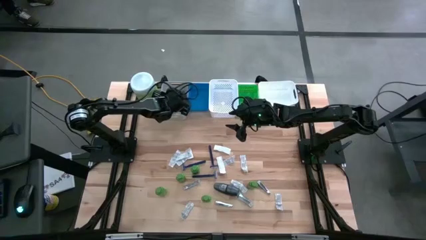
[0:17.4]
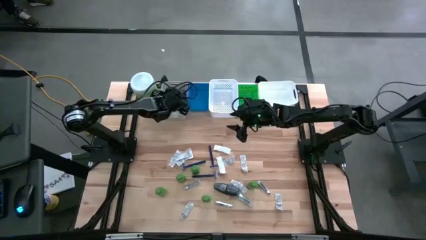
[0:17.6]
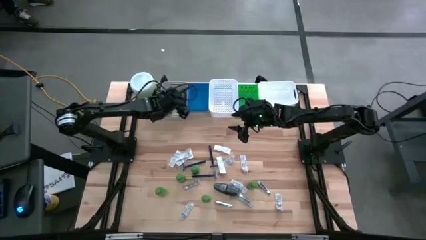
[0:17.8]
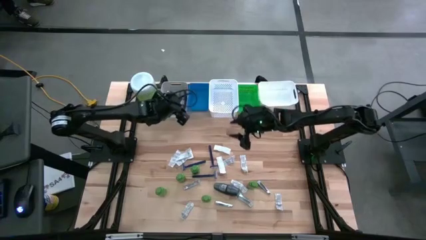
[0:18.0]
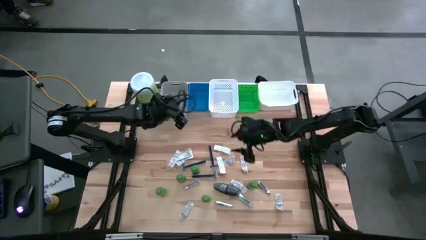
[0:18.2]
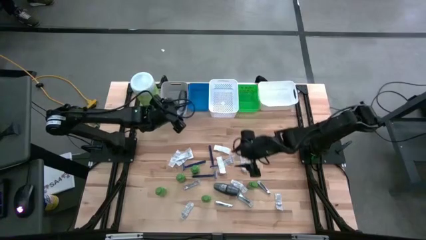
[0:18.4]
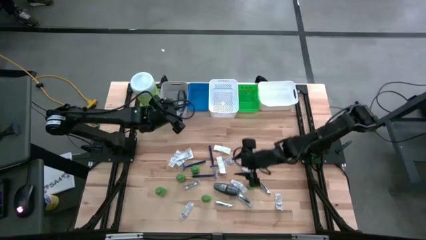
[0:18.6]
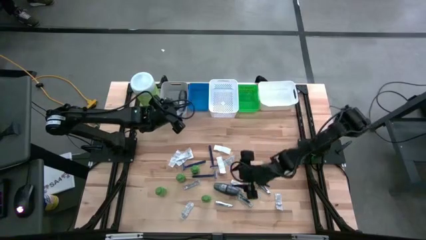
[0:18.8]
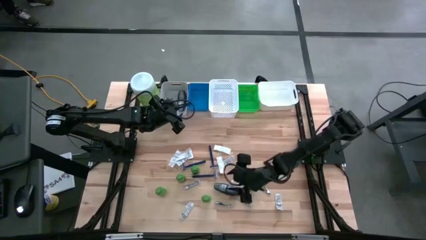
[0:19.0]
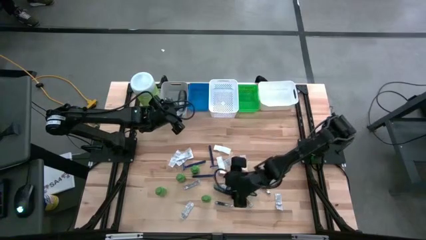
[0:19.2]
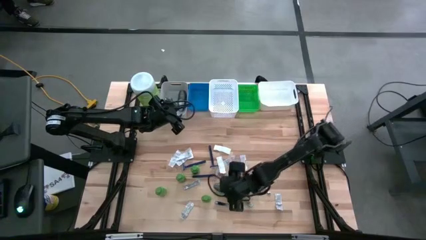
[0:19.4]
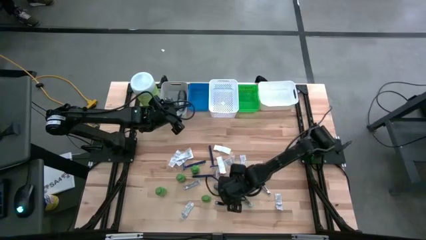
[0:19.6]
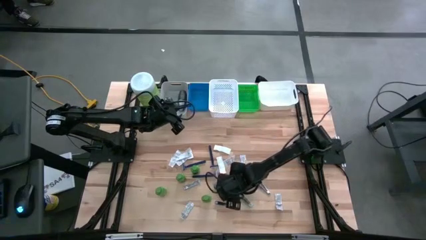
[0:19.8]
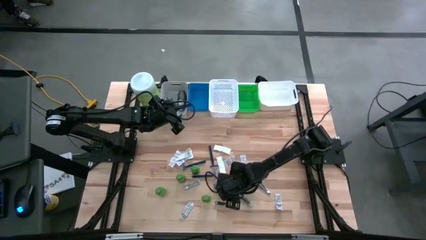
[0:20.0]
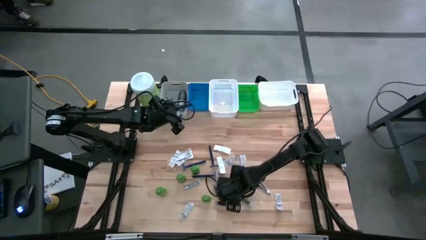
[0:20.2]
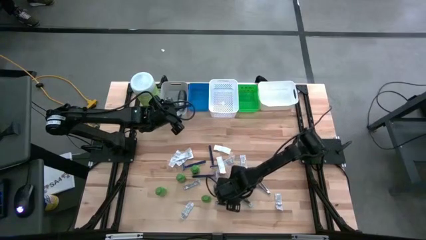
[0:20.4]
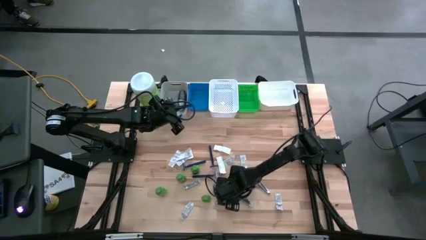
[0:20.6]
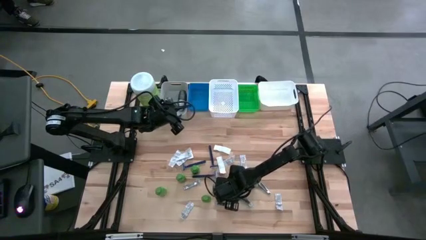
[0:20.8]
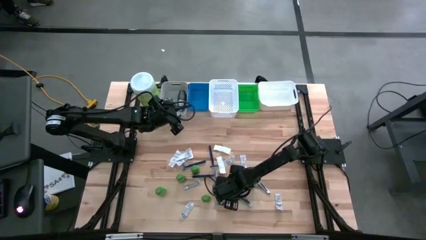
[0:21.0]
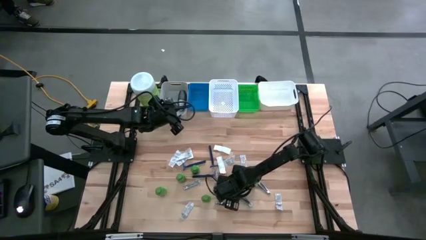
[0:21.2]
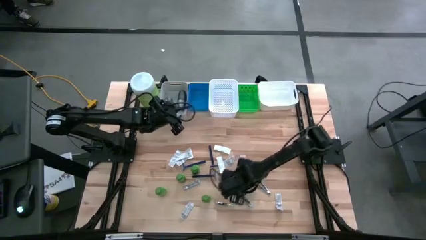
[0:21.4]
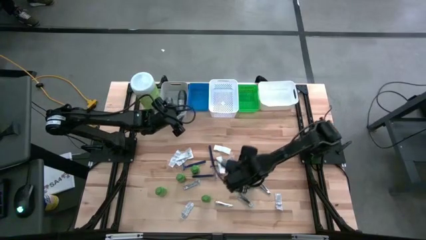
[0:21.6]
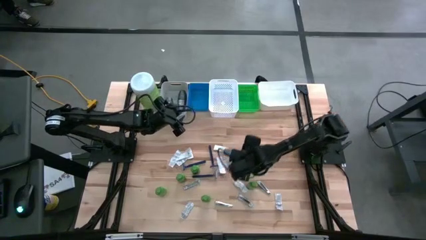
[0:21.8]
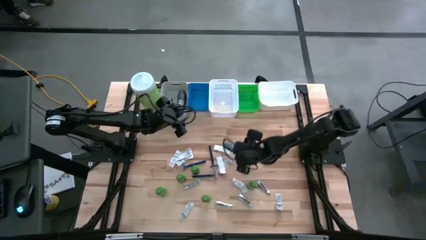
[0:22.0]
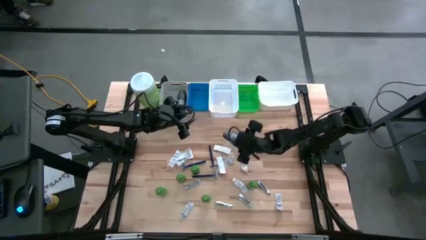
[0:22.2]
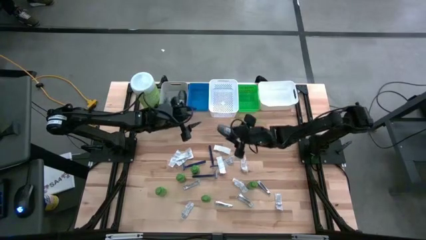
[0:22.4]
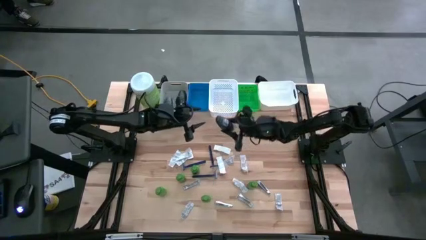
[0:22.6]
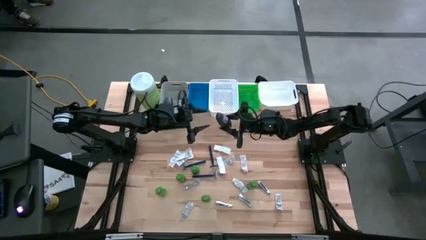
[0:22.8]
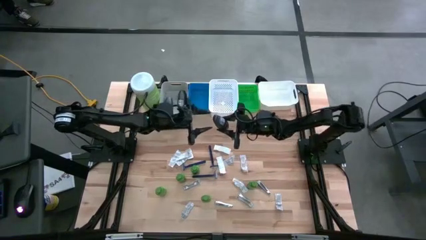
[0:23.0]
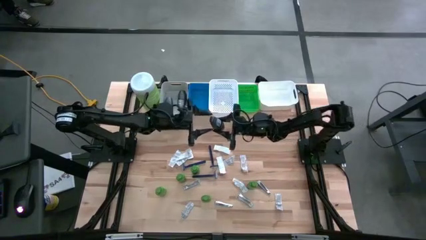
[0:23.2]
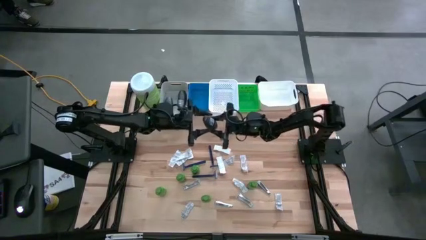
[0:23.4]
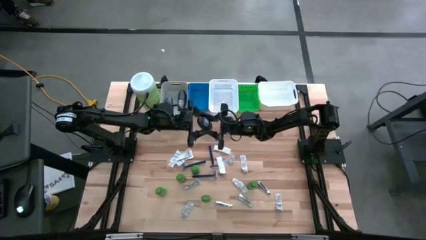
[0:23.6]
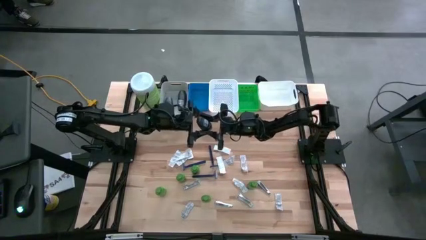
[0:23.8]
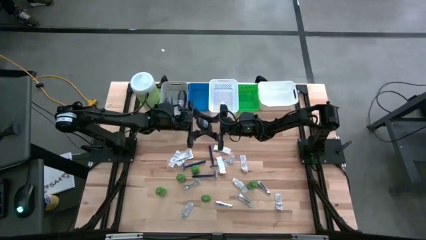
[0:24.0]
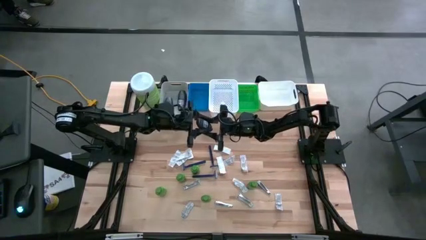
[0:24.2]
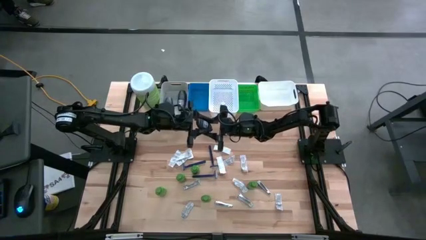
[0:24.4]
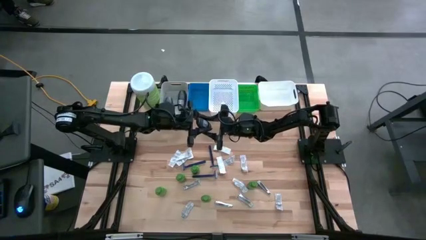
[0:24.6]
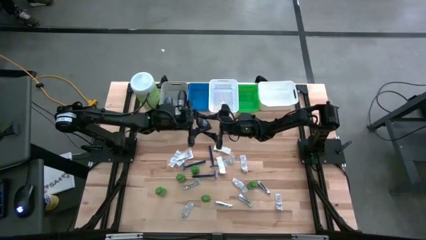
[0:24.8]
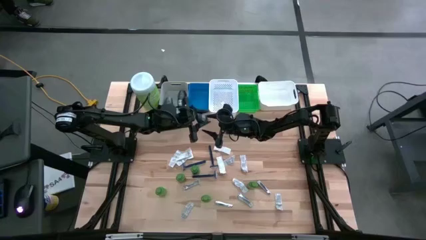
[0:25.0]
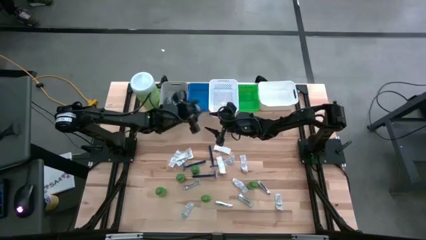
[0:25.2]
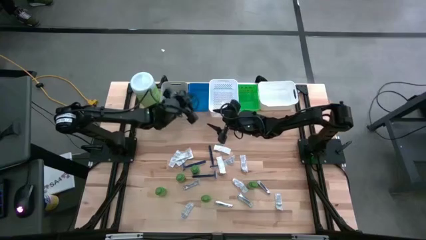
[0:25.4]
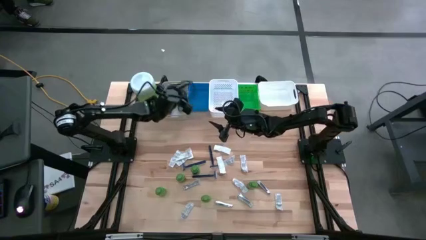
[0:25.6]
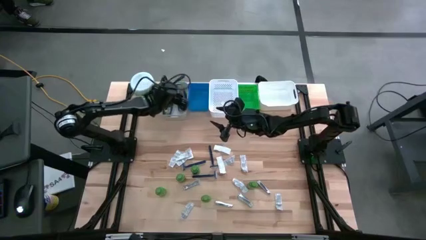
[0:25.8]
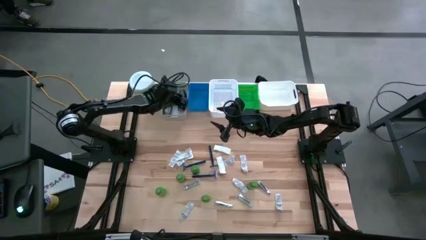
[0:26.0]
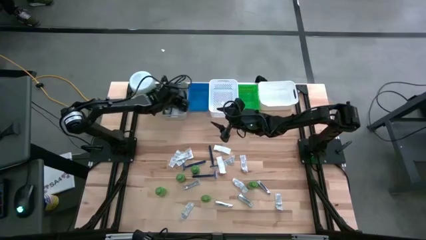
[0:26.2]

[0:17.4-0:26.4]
Task: Pick & Place Travel size toiletries
Put the gray deodorant into the gray bin

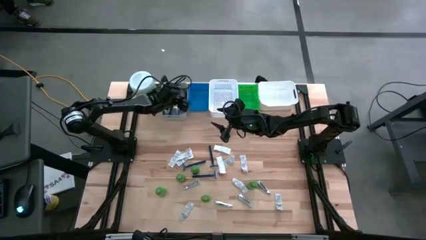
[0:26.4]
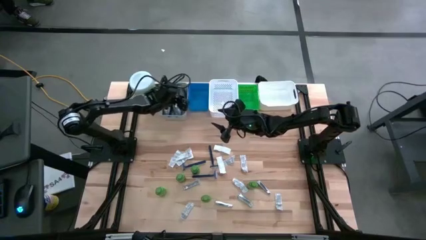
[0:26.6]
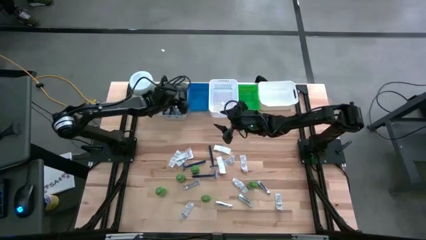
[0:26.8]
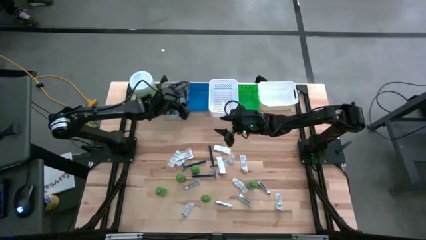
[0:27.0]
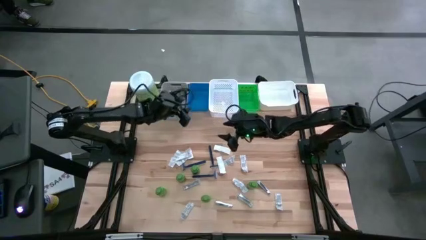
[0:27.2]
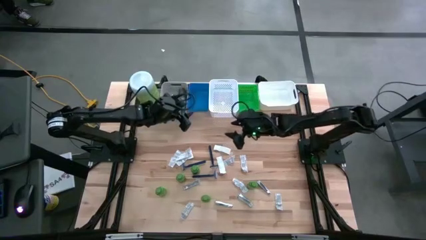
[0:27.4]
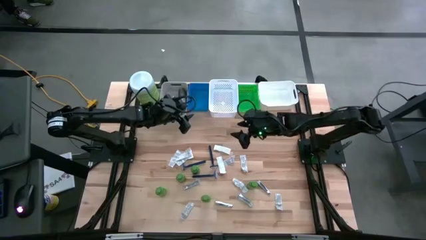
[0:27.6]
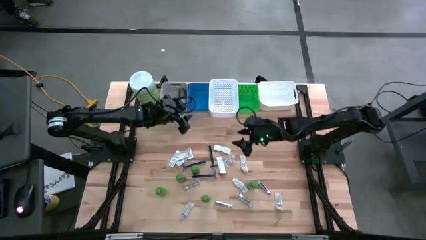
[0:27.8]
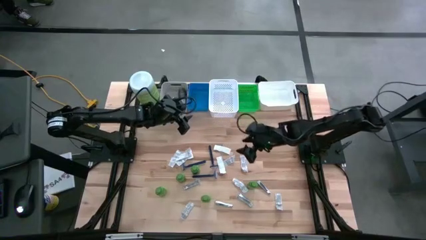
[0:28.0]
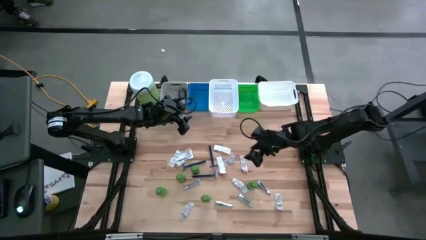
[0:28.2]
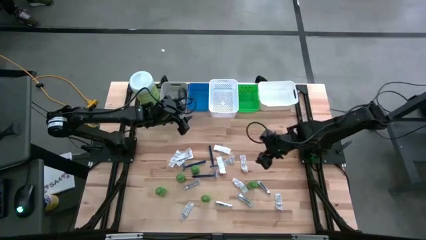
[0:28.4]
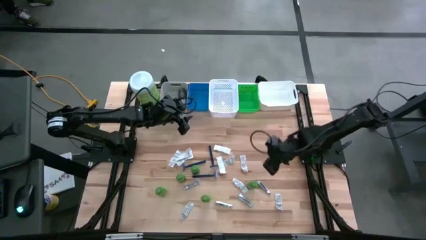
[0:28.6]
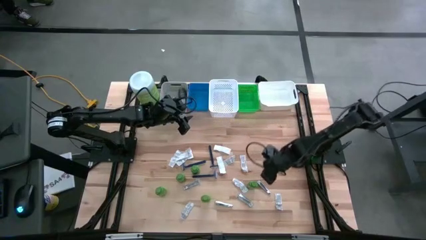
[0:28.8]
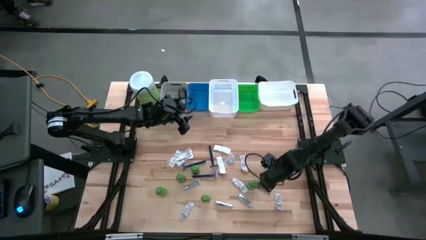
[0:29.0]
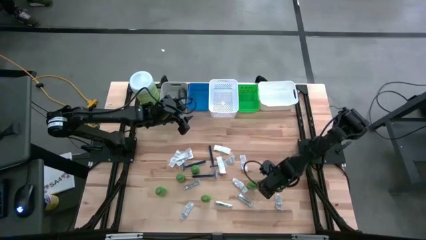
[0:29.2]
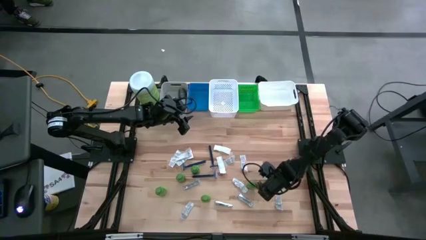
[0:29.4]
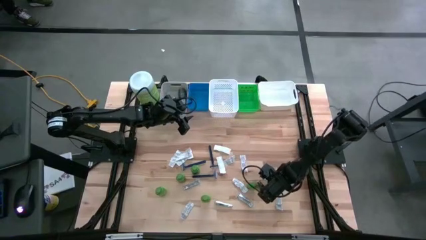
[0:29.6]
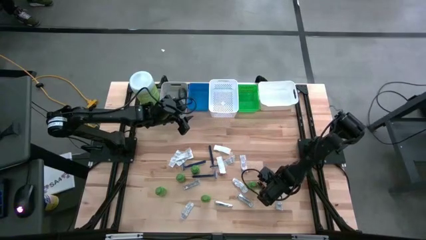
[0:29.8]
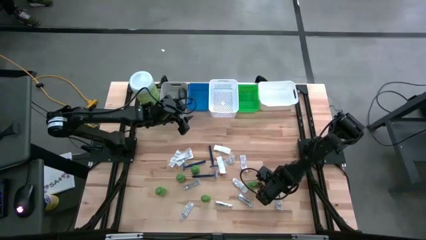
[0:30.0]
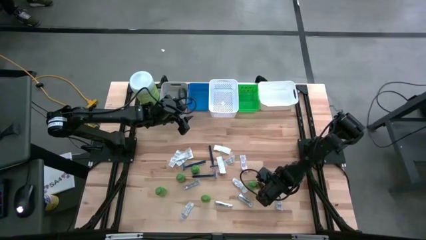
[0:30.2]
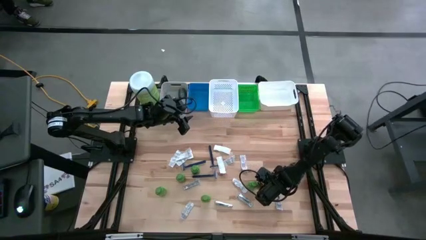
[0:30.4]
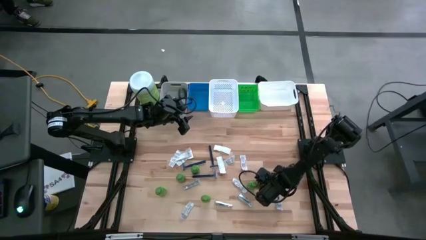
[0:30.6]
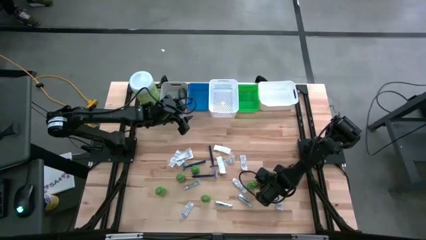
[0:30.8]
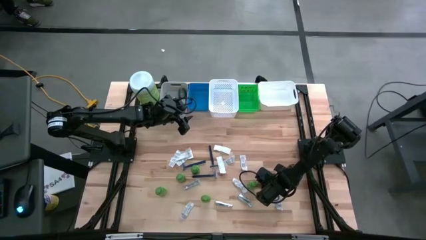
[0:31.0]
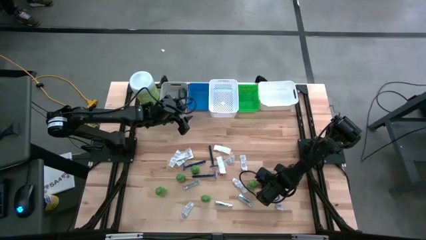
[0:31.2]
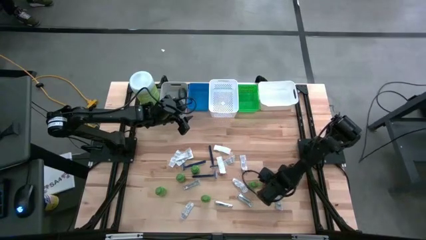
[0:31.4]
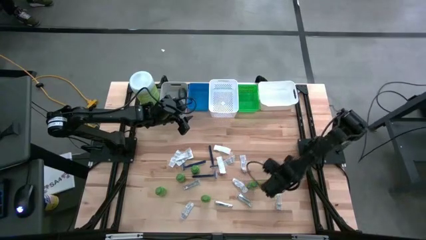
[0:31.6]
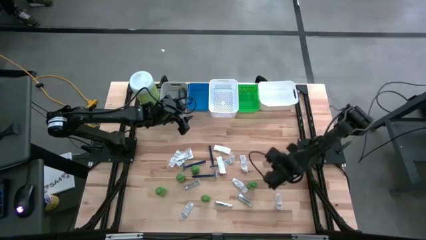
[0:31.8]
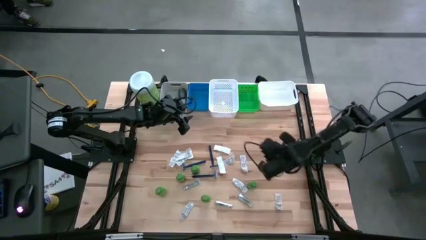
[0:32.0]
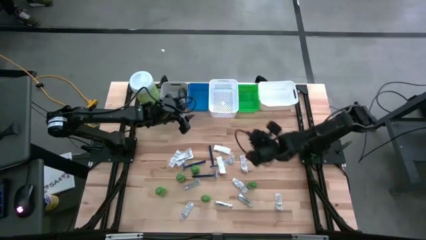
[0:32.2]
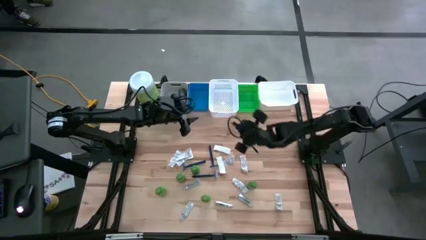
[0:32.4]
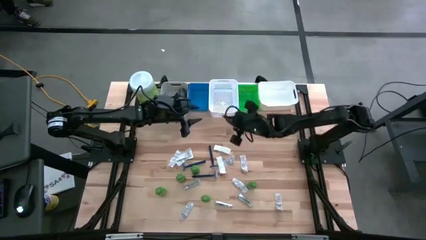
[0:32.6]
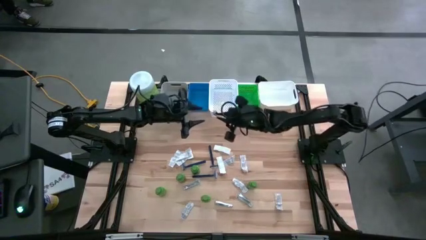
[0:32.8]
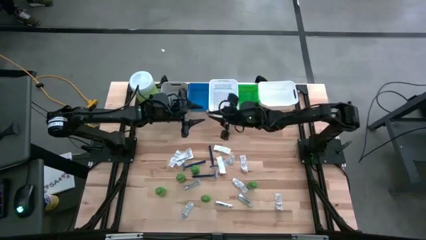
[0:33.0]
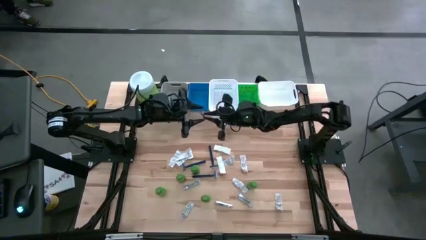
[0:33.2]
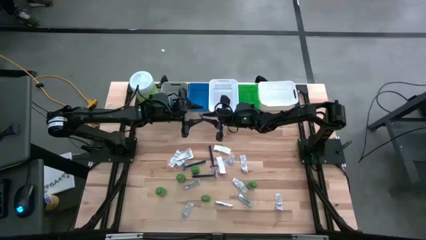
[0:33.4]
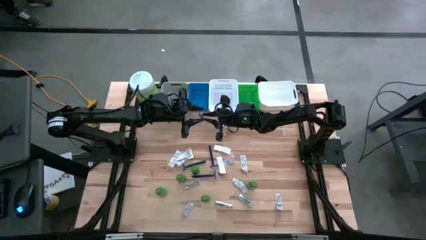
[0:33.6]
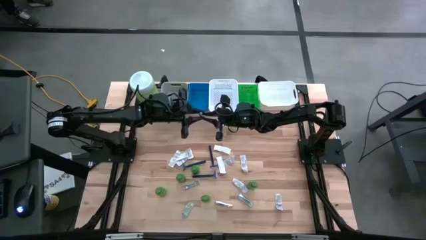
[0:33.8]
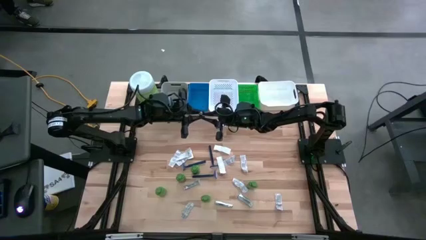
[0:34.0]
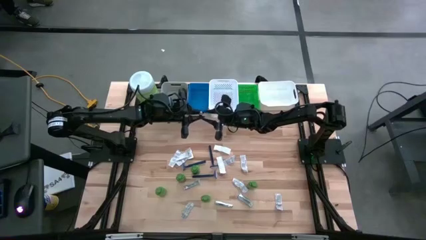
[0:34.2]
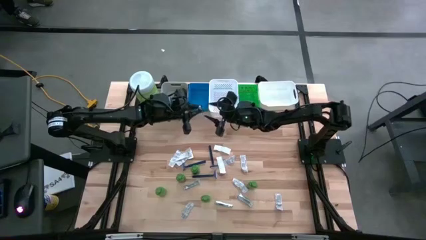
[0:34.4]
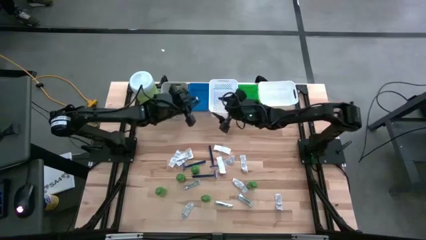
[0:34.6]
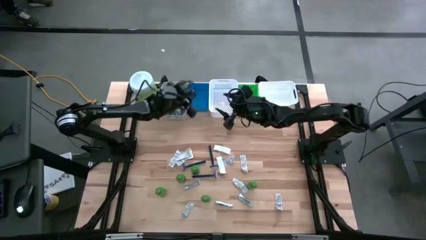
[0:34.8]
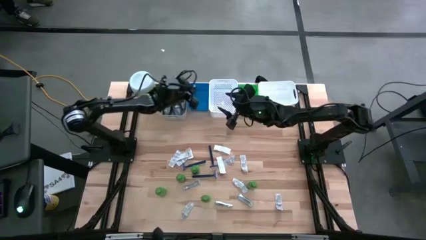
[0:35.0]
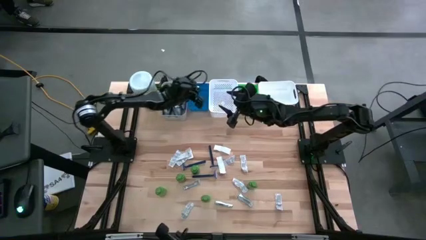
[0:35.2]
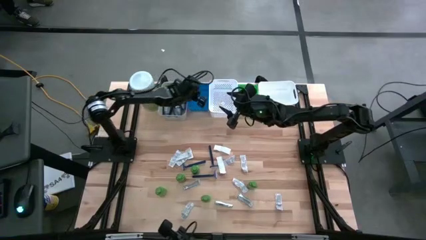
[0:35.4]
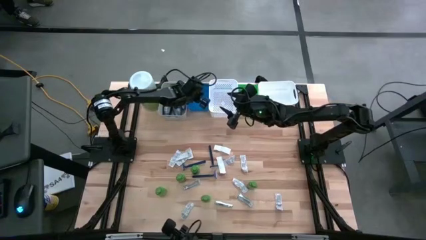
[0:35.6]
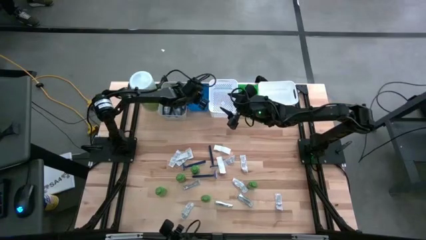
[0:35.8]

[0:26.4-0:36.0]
Put the silver nail cutter into the blue bin
